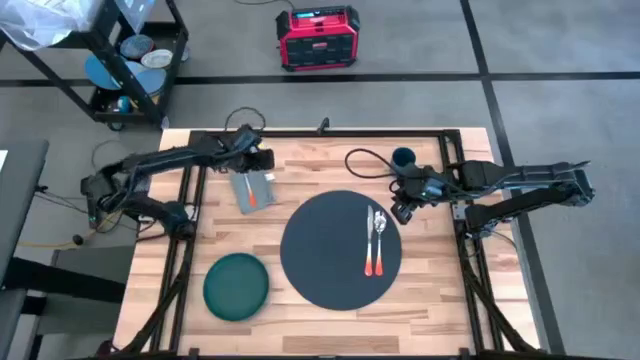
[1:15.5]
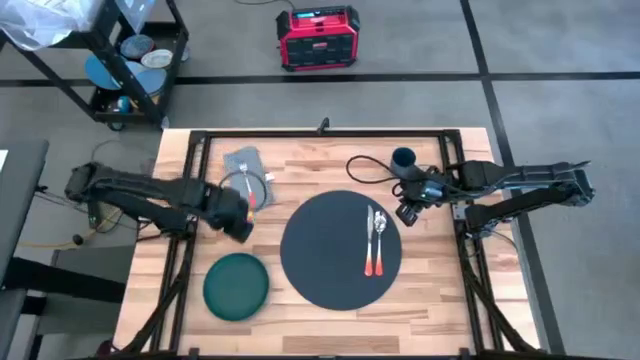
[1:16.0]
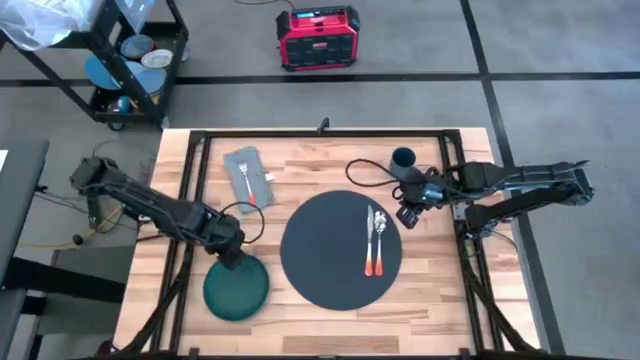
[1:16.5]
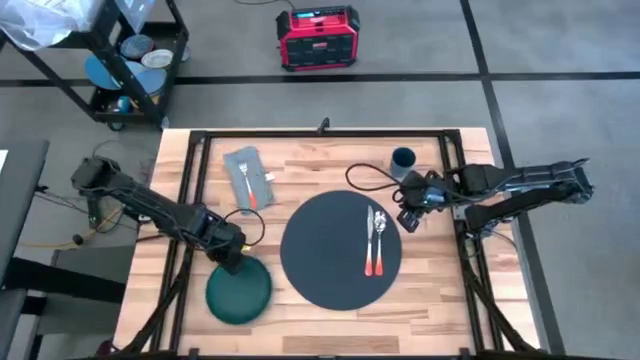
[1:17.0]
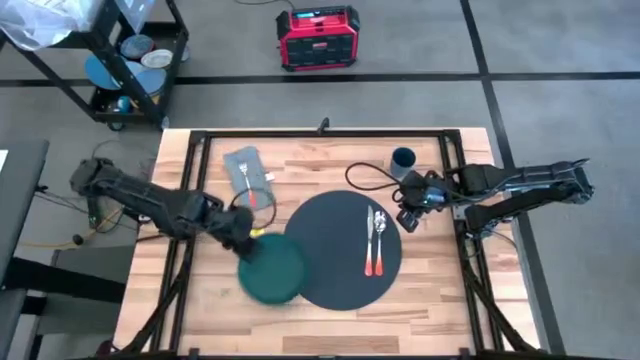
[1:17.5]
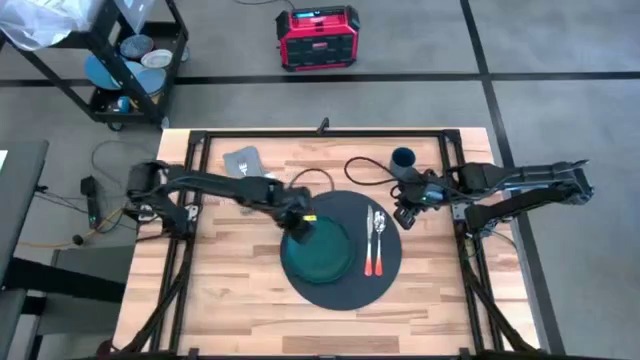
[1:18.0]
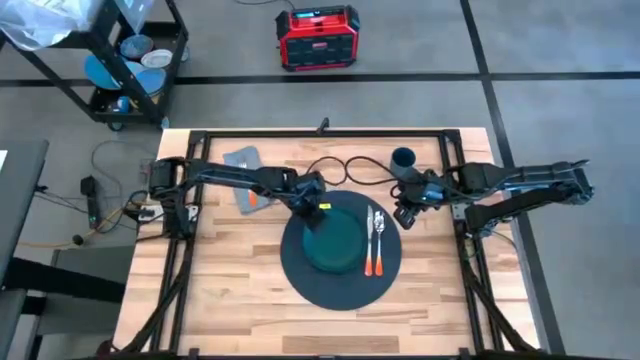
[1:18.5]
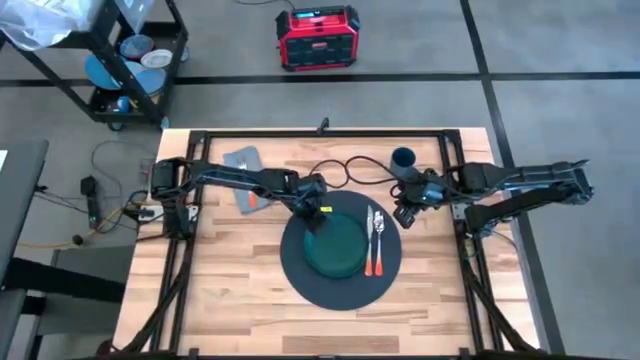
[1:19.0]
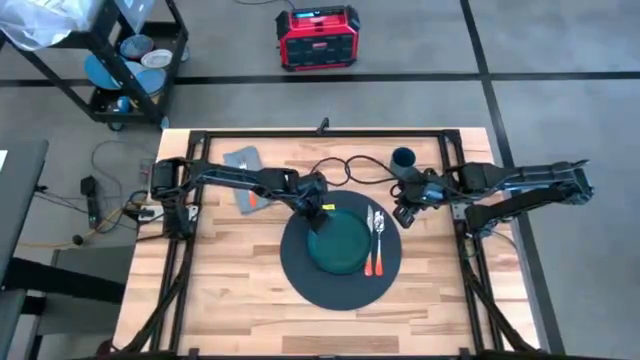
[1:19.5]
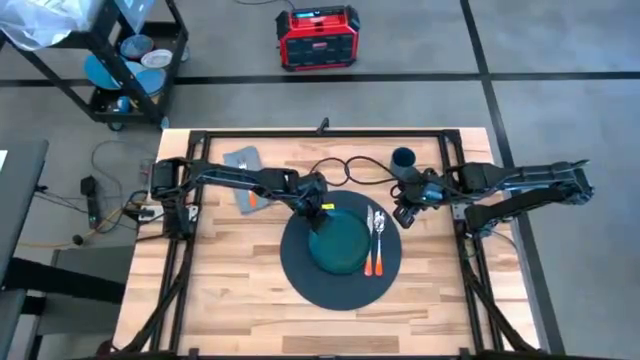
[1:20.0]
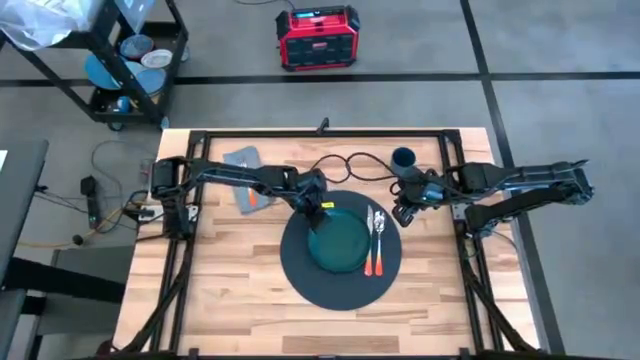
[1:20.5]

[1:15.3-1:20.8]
Task: Set table place
Put the green plate to the left of the orange table knife on the blue tablemat

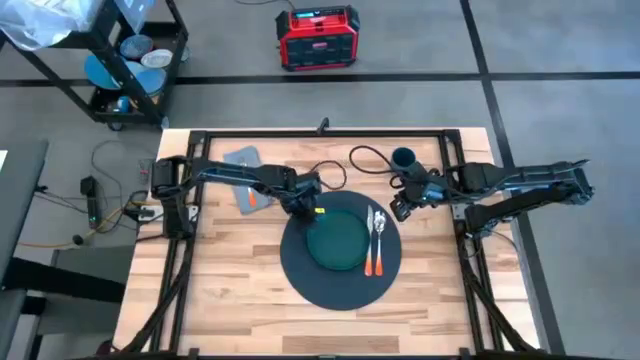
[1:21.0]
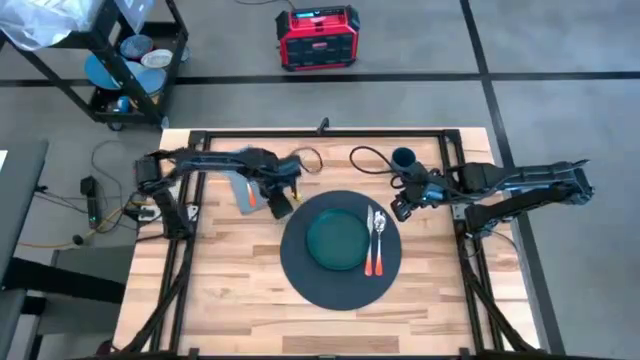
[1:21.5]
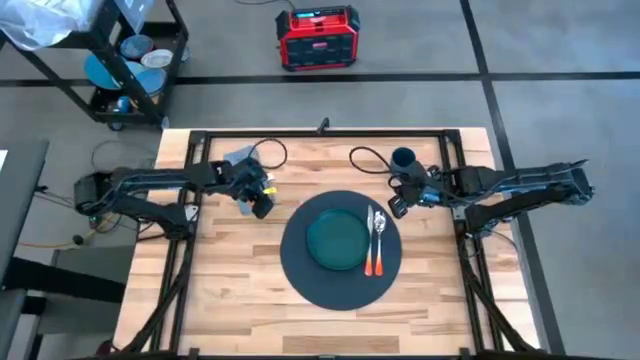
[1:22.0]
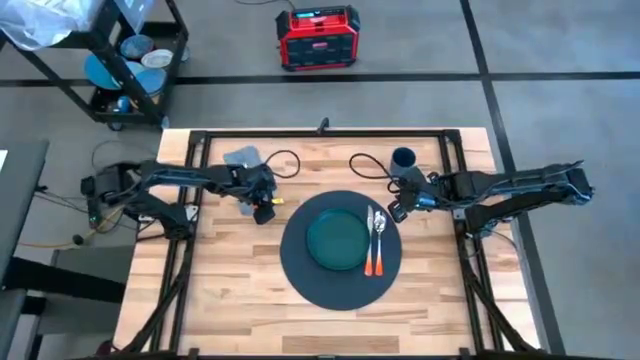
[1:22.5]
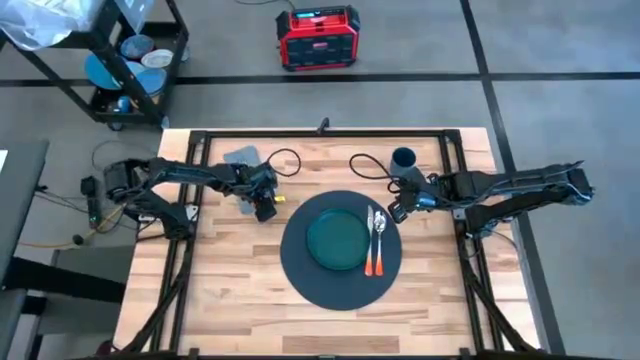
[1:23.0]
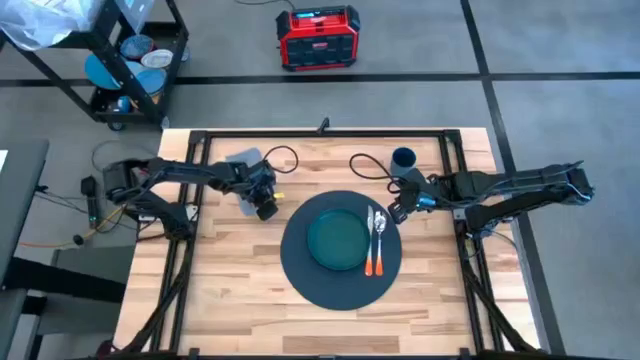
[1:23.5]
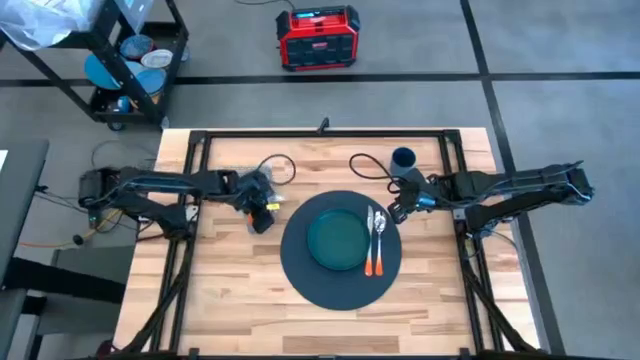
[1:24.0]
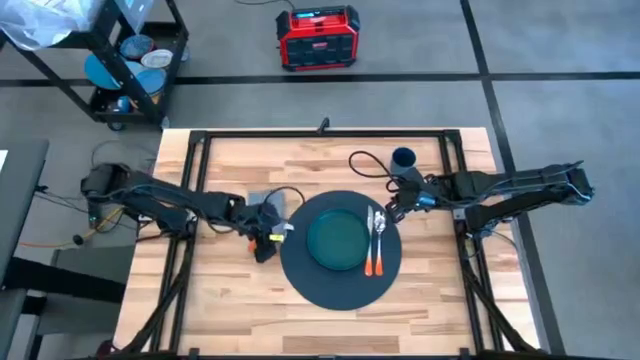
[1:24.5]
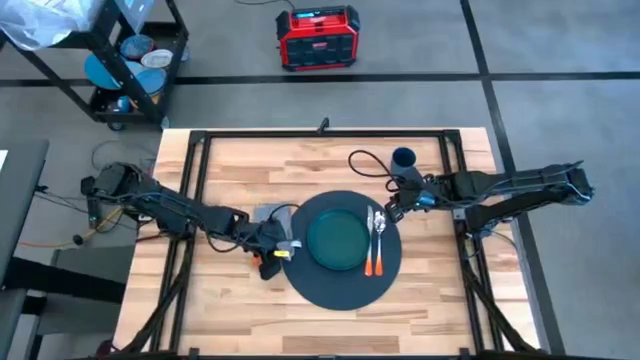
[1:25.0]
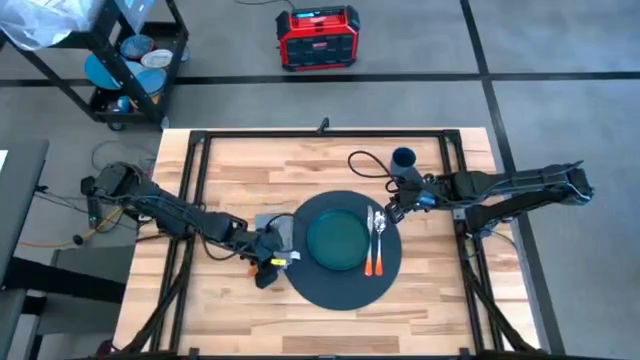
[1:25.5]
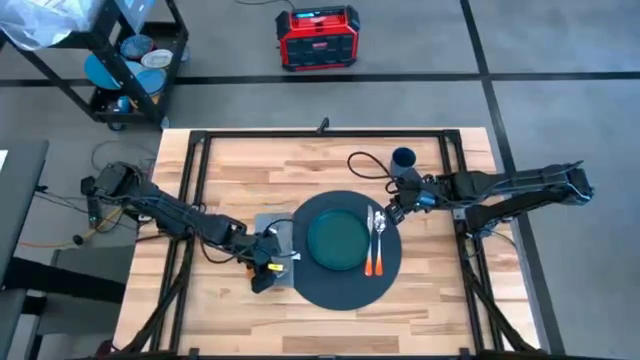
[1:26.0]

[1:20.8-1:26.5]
Put the gray table napkin to the left of the blue tablemat

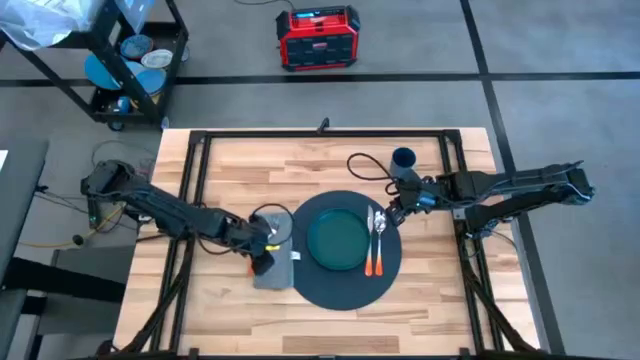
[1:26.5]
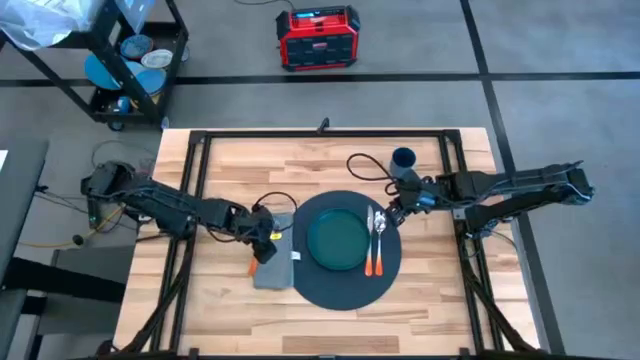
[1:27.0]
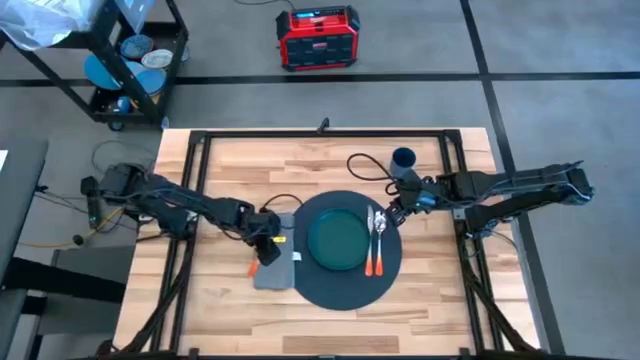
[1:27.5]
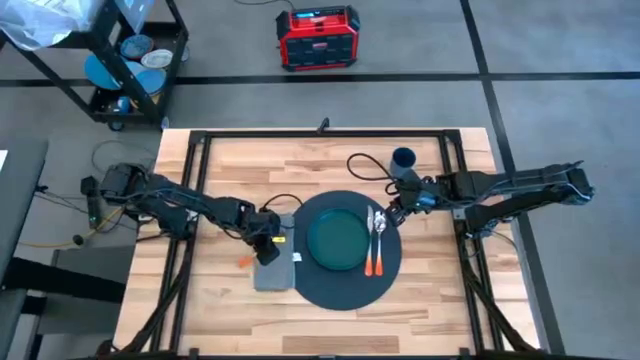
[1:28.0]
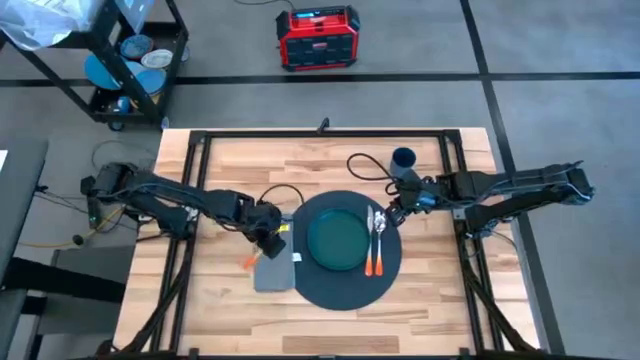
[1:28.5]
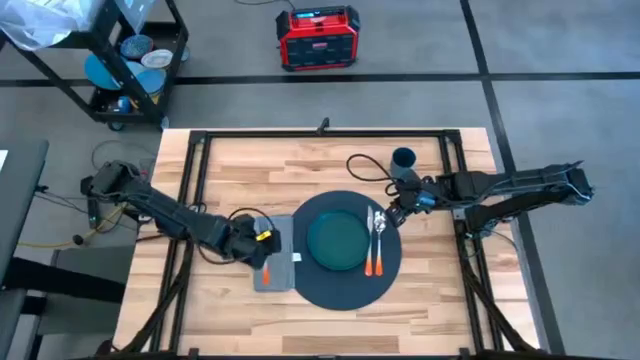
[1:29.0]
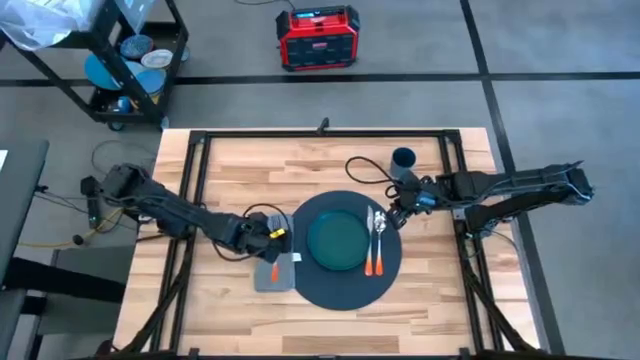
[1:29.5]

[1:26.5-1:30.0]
Adjust the orange fork on the gray table napkin

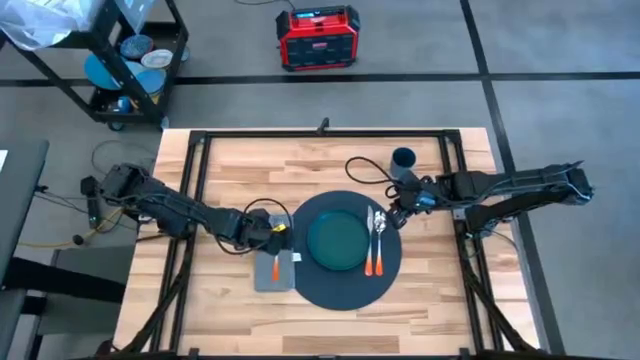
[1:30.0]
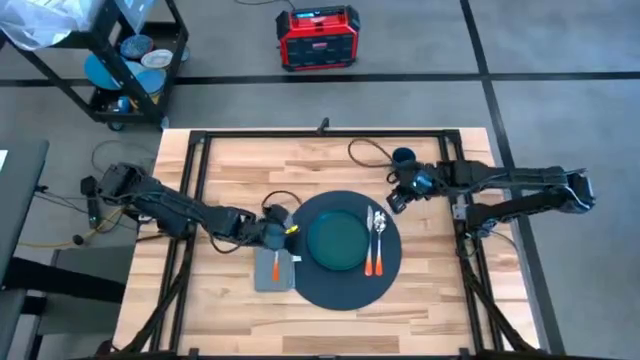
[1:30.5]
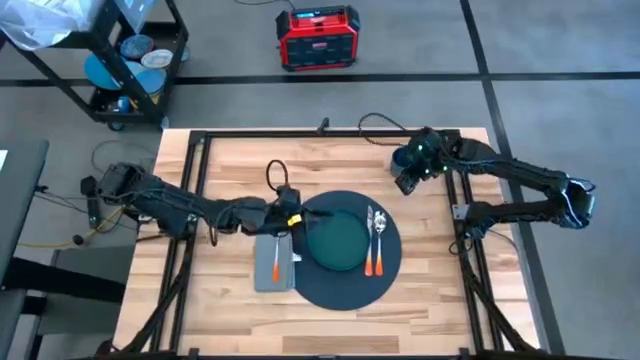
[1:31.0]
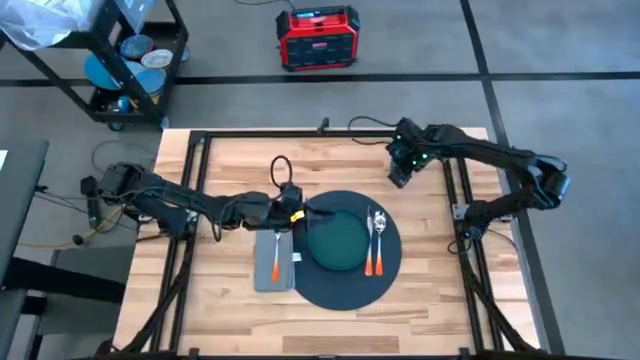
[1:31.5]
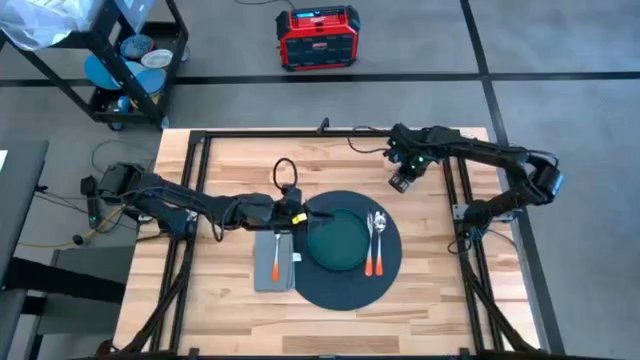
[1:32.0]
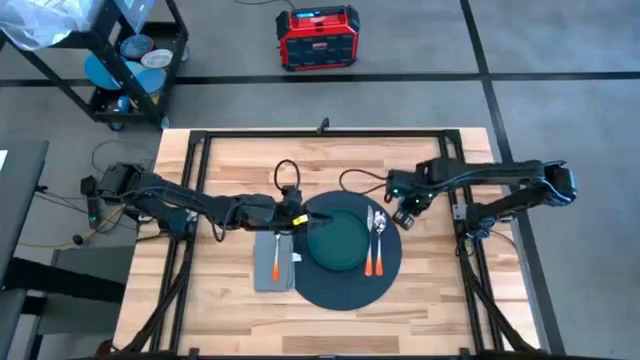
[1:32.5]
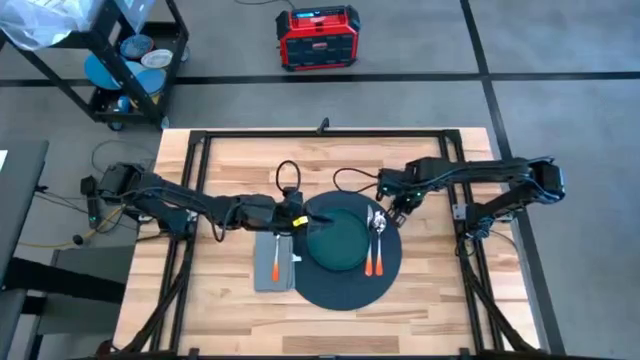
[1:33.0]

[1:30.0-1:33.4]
Put the blue cup to the top of the blue tablemat

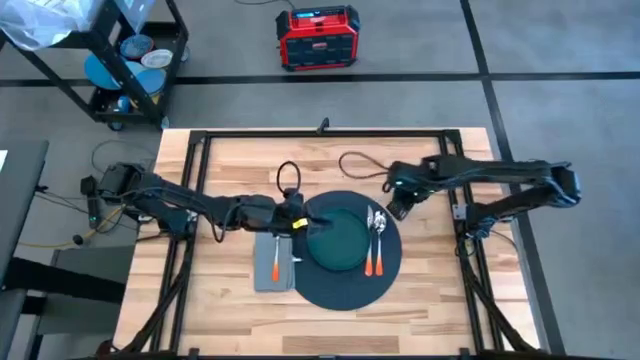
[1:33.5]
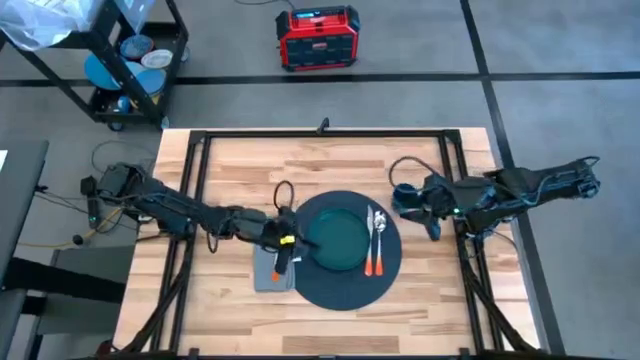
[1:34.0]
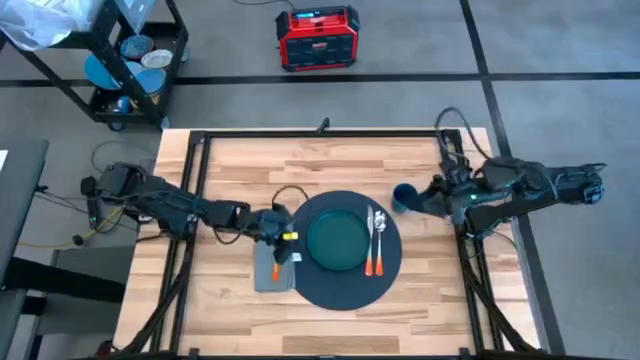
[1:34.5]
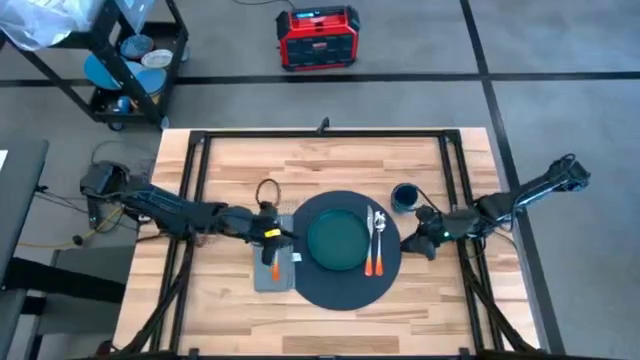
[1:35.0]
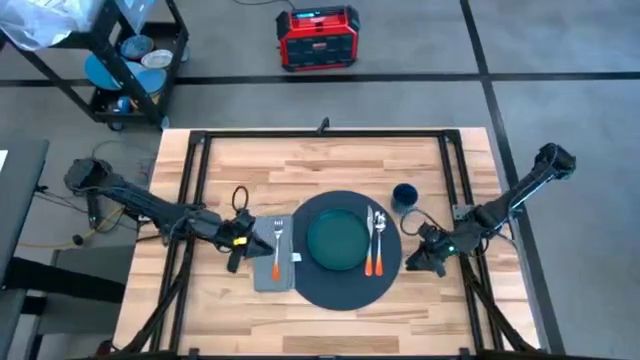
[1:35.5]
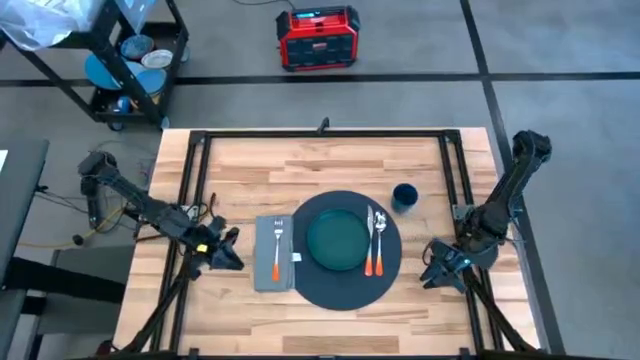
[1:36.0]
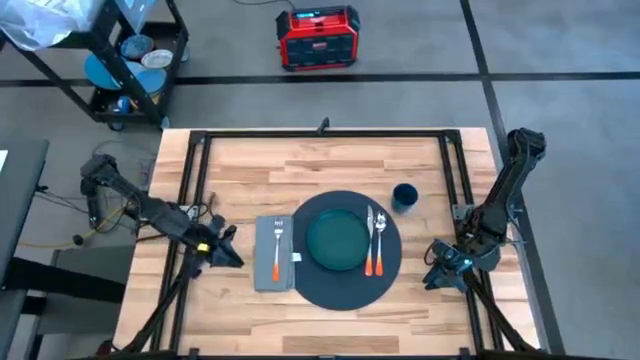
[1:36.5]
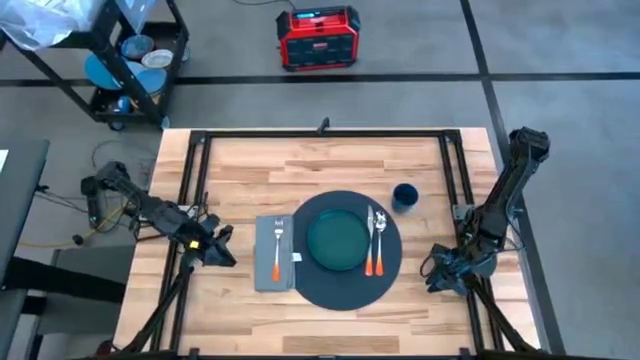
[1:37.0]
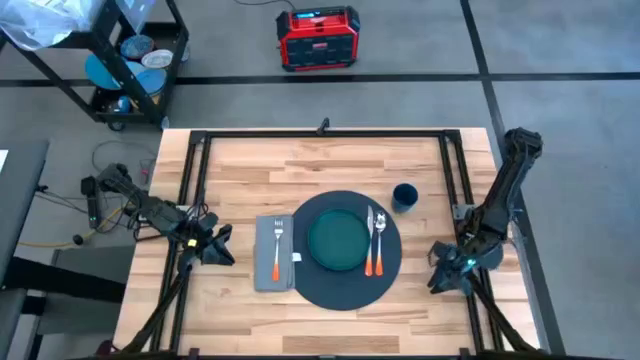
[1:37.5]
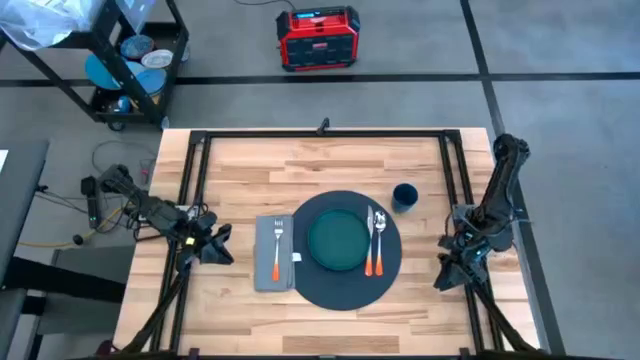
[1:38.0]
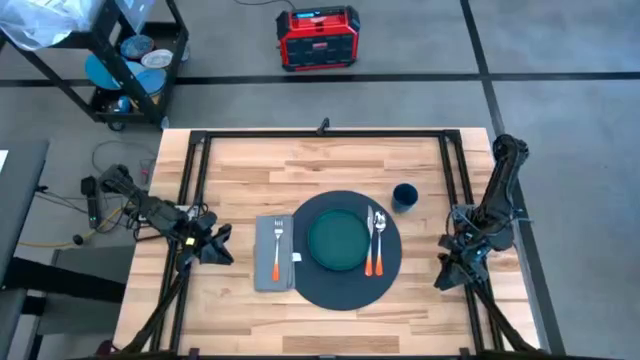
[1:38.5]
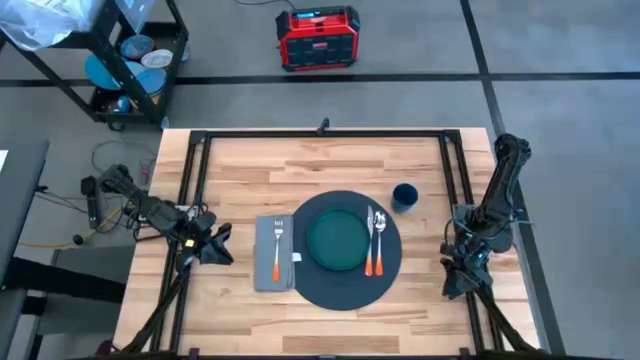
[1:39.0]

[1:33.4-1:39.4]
Return to Home Position
